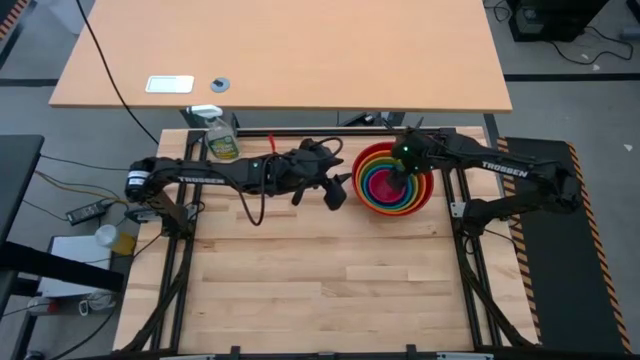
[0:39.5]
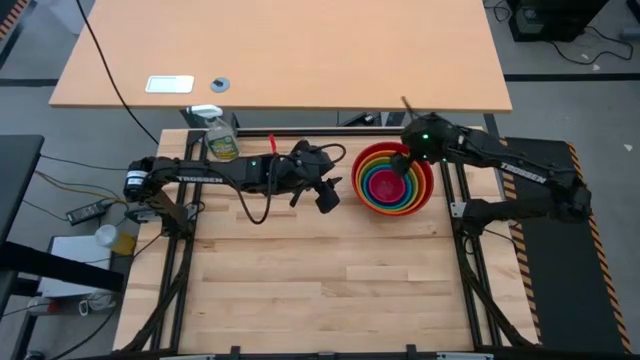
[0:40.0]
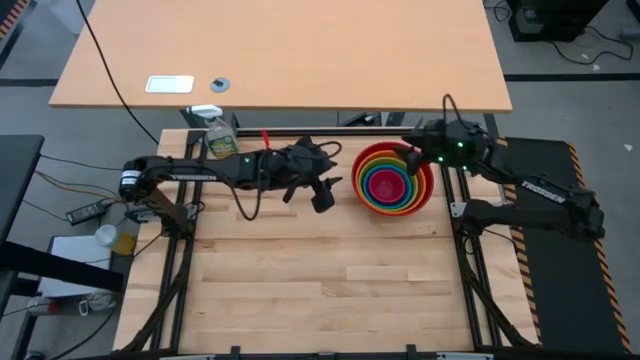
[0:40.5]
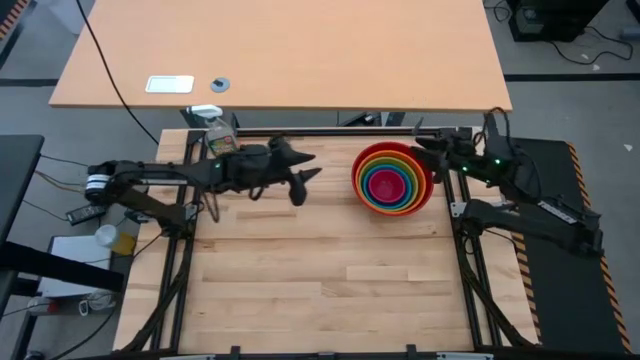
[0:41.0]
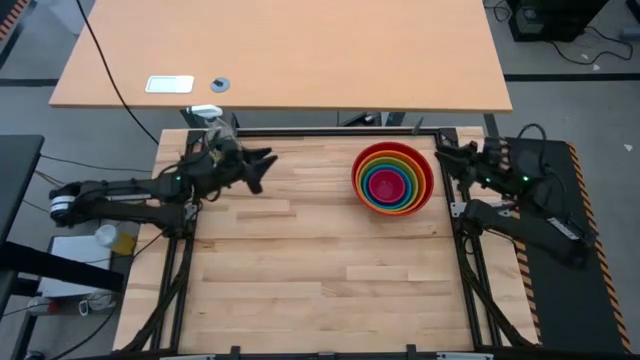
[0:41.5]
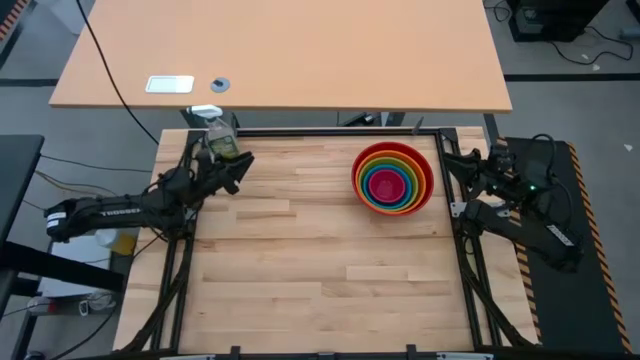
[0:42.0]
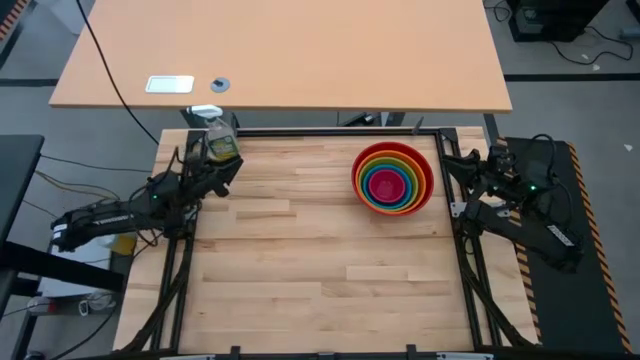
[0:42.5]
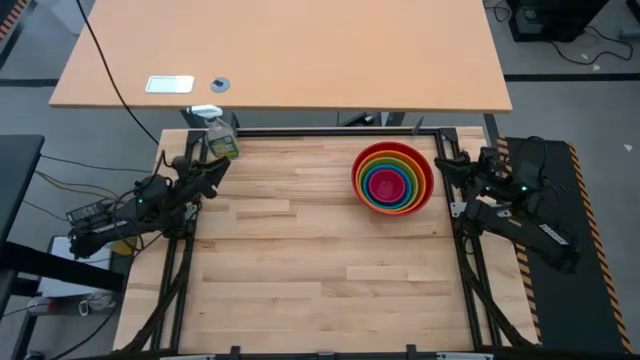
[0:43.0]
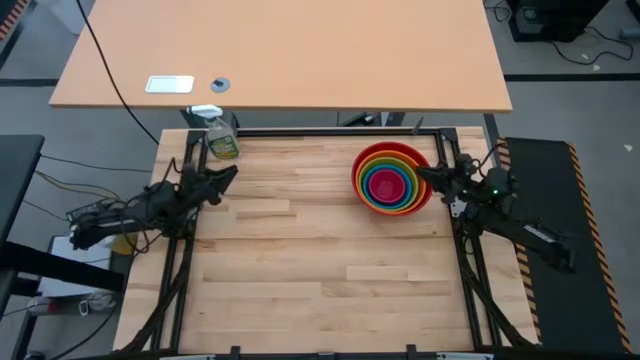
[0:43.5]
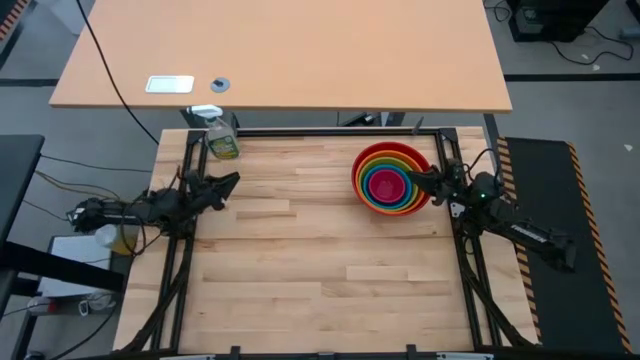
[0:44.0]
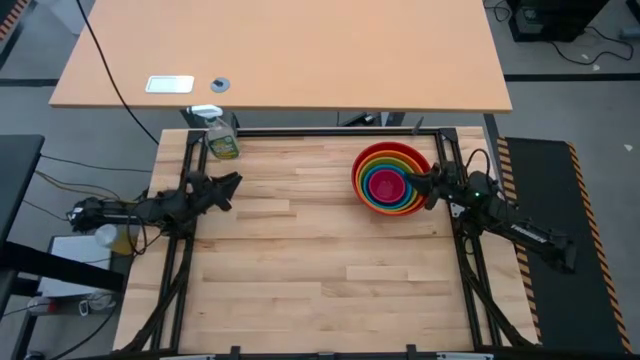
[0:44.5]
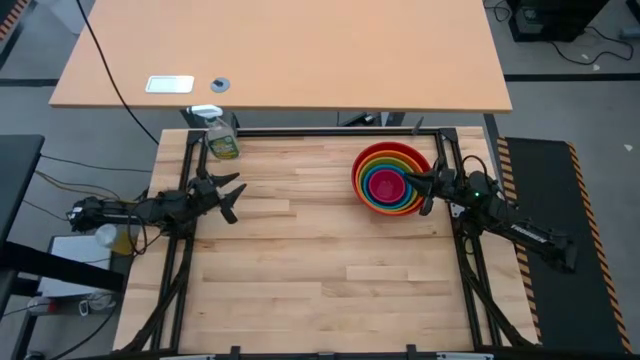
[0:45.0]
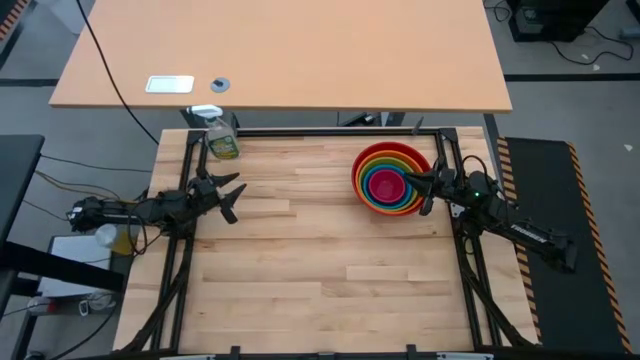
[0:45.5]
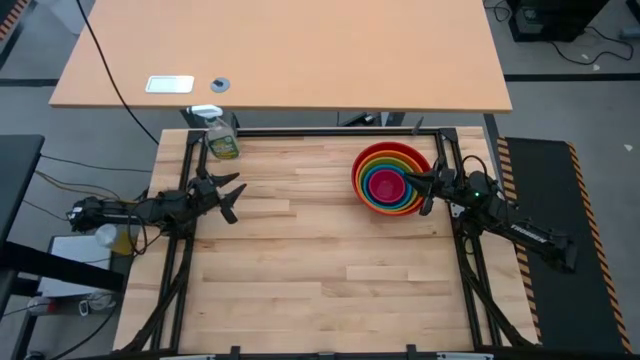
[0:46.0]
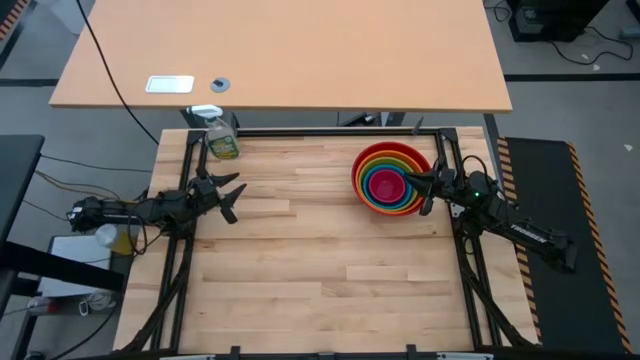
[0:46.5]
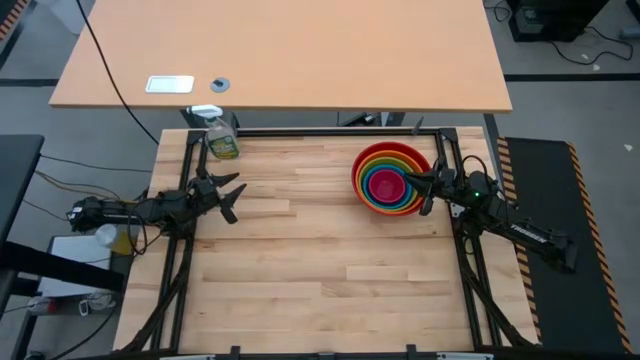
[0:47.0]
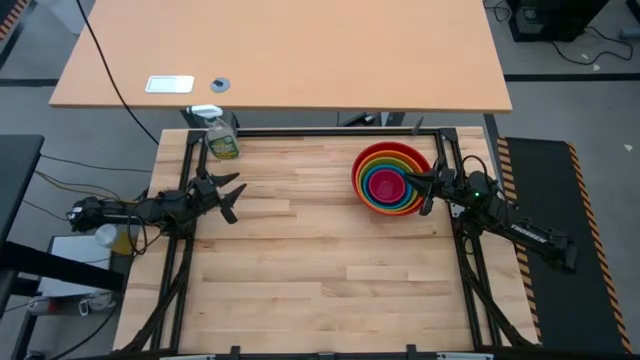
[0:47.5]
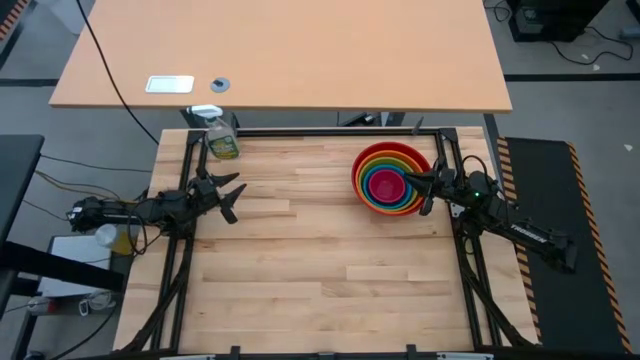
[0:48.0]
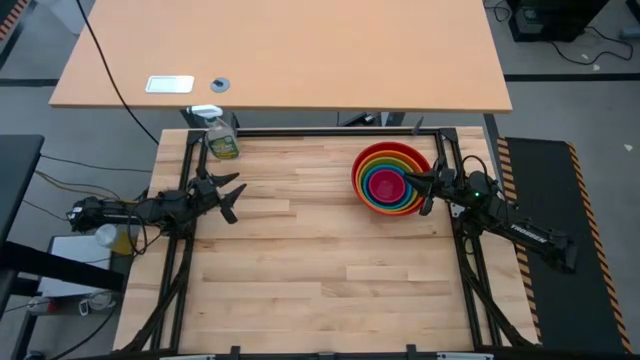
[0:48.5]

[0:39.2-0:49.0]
Return to Home Position

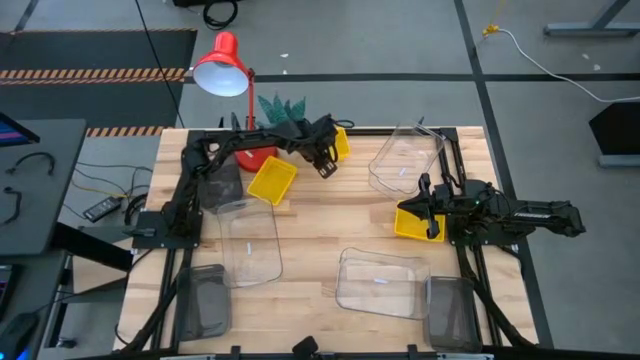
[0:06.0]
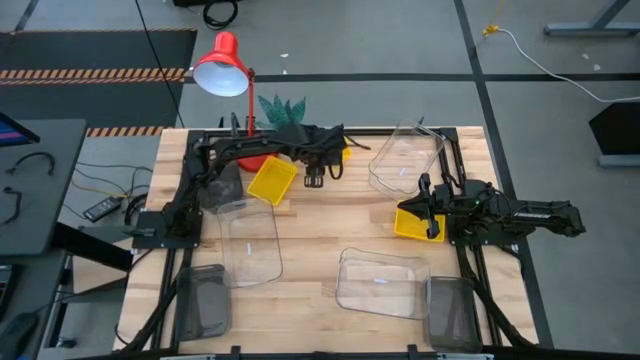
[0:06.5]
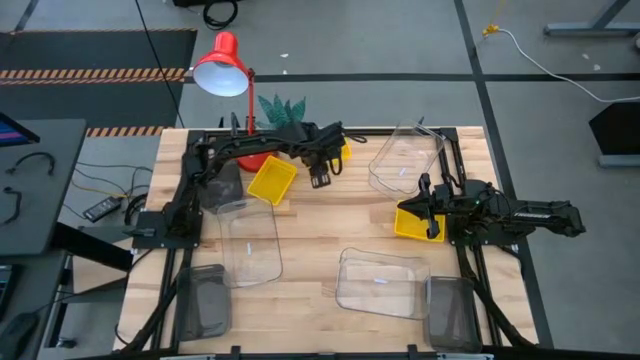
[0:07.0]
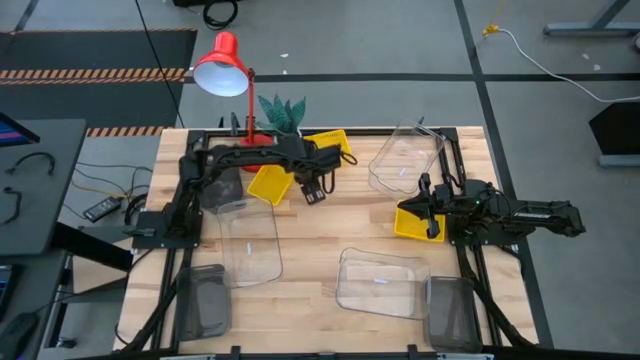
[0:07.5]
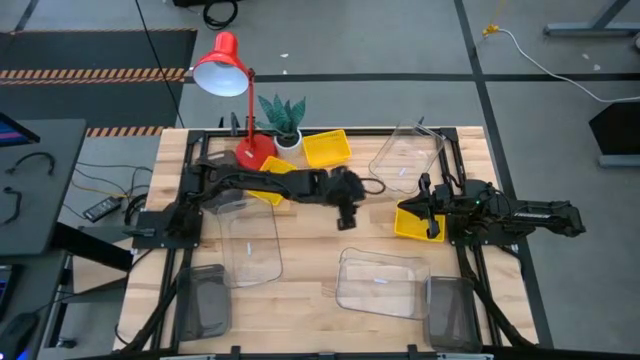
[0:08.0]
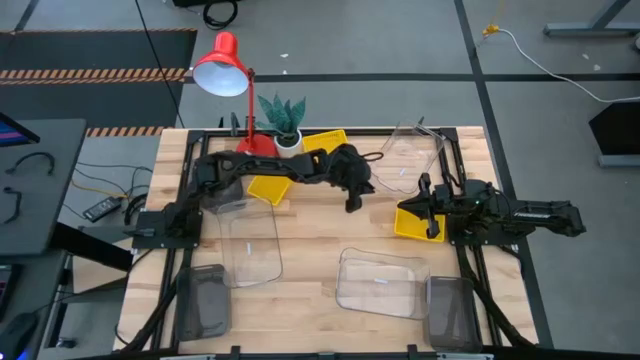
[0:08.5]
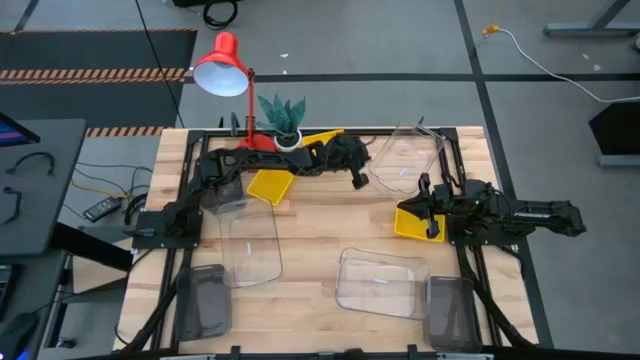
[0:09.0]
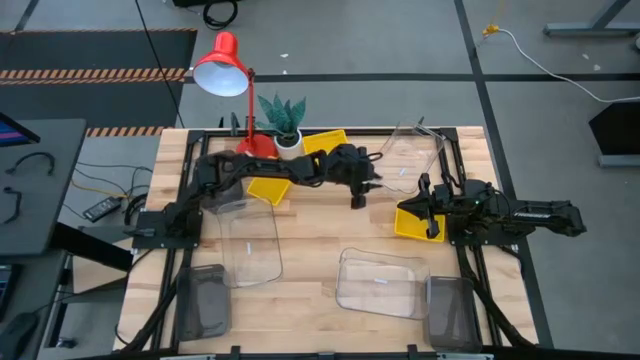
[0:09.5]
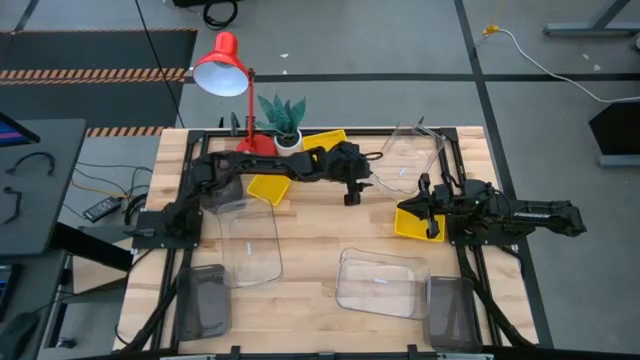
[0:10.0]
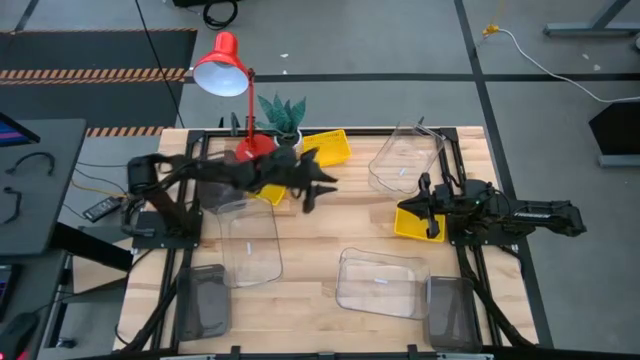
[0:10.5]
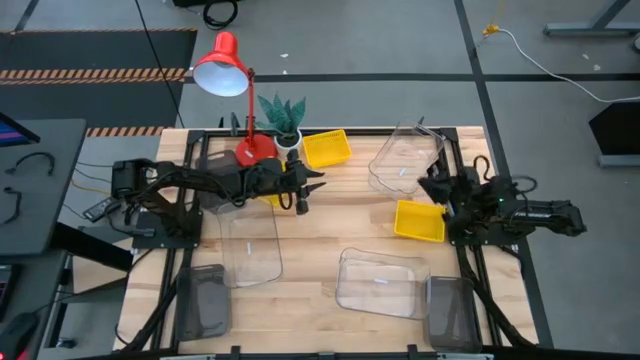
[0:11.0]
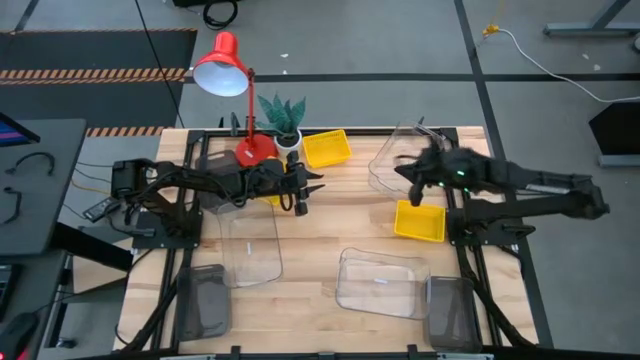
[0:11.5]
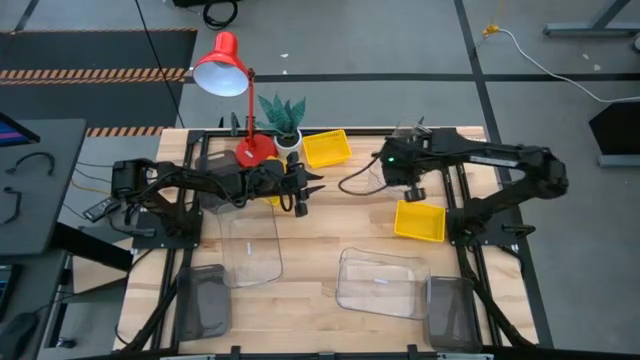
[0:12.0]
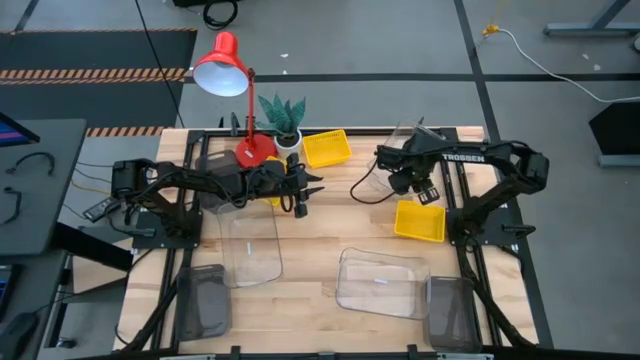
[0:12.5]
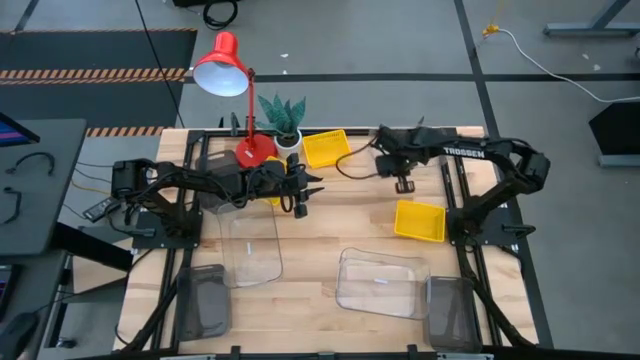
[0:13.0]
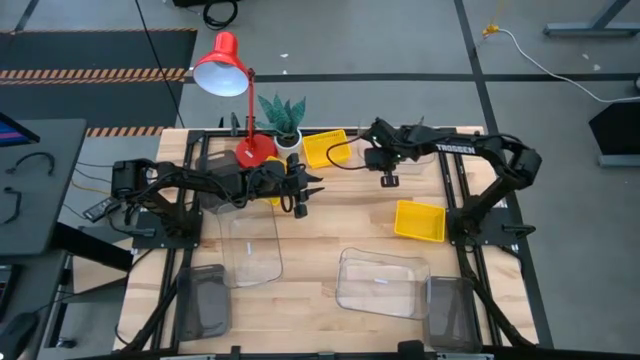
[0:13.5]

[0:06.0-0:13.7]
Adjust the top transparent bin on the table

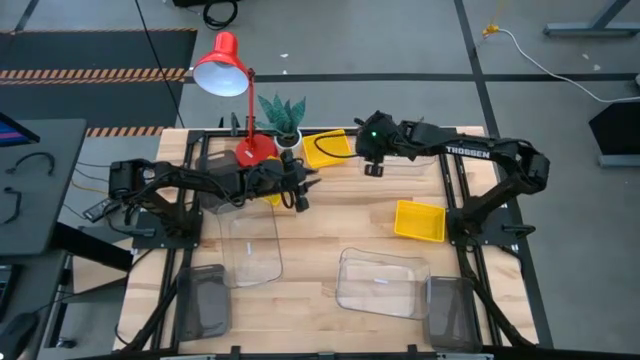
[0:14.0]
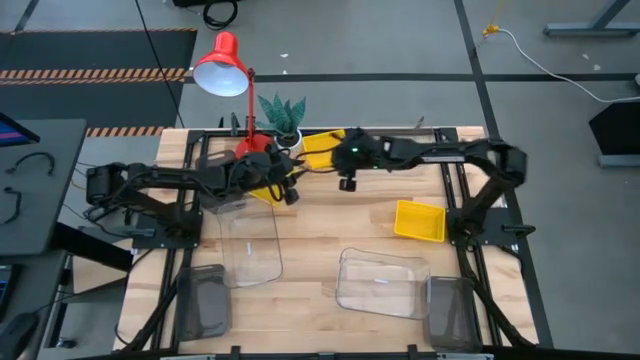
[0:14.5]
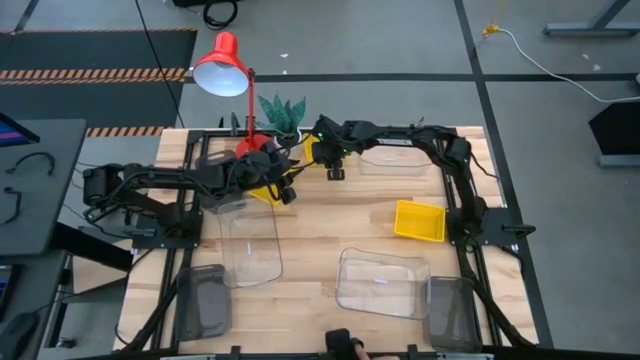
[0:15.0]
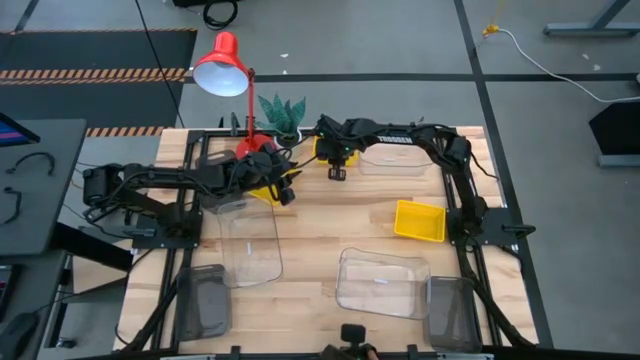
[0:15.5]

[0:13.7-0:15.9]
Adjust the middle yellow bin on the table

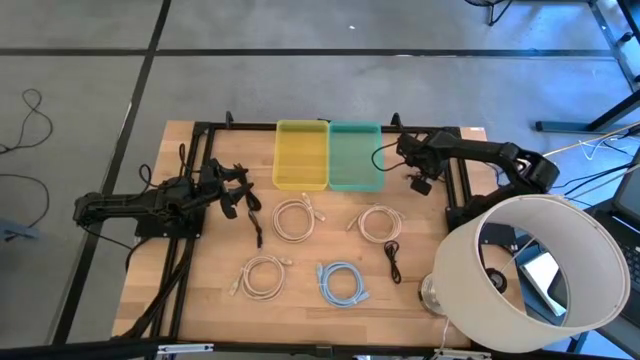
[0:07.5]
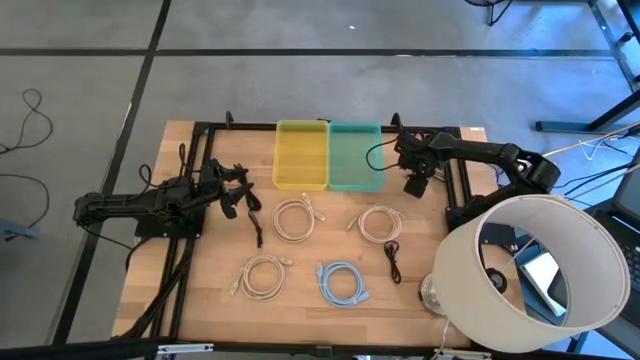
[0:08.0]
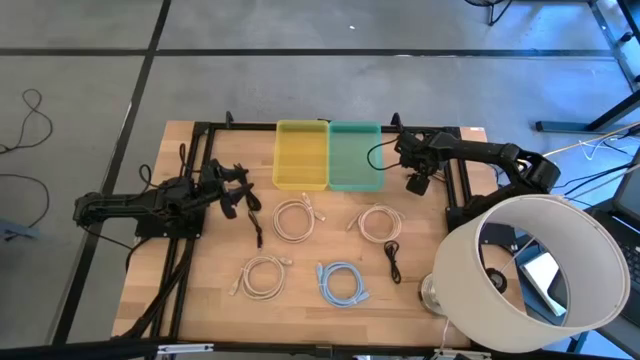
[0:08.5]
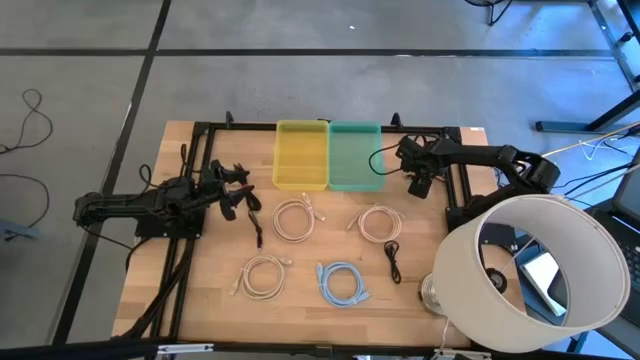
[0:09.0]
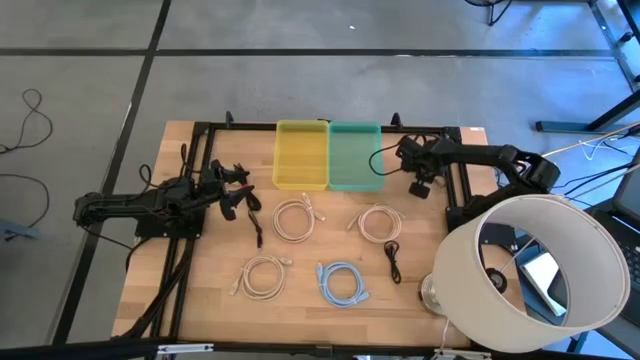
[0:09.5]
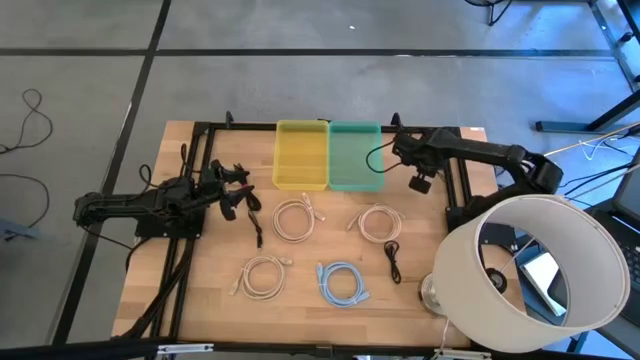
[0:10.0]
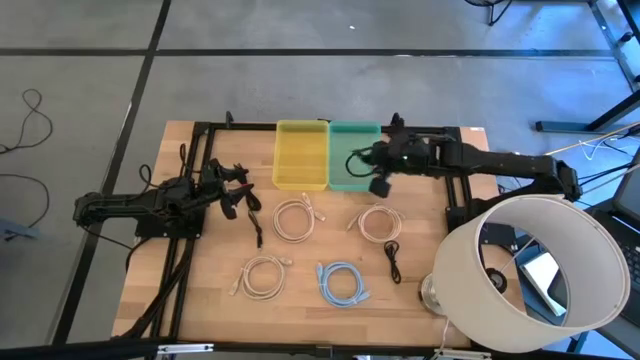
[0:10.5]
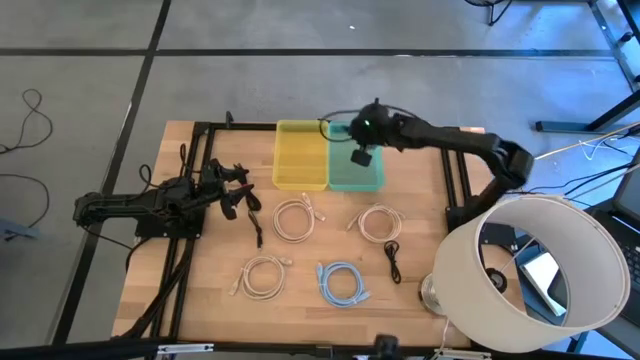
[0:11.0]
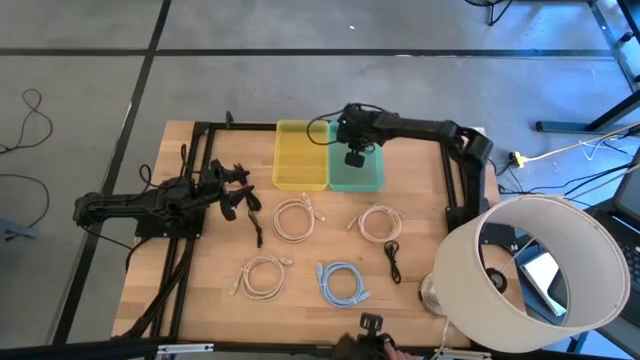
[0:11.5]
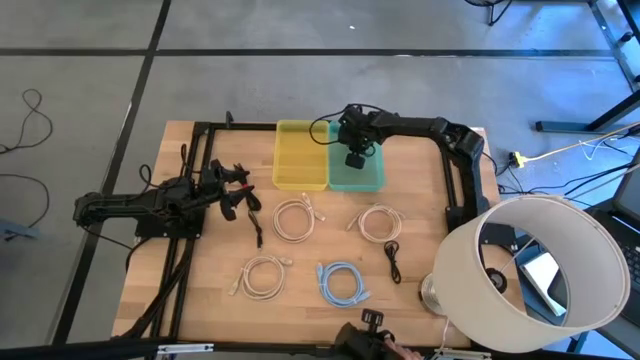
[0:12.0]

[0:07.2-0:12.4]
Put the black charger cable into the green bin
